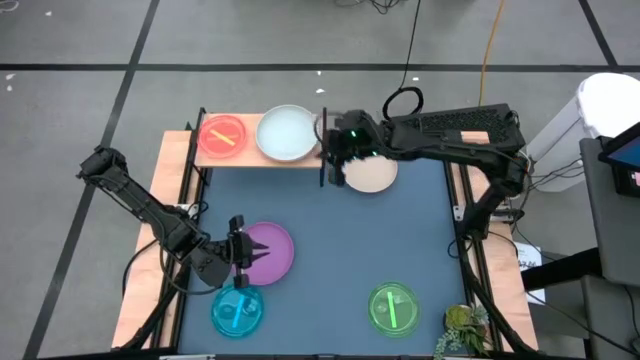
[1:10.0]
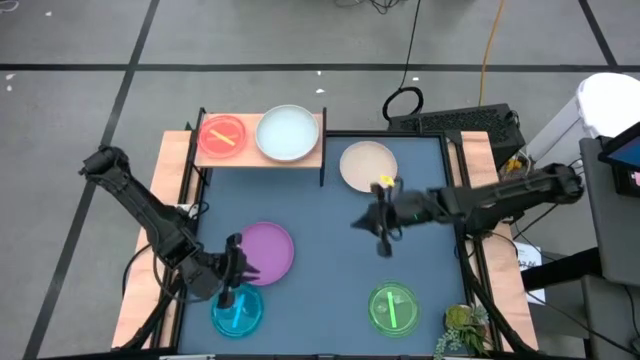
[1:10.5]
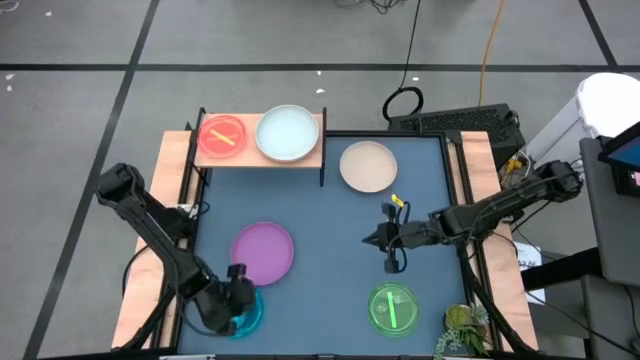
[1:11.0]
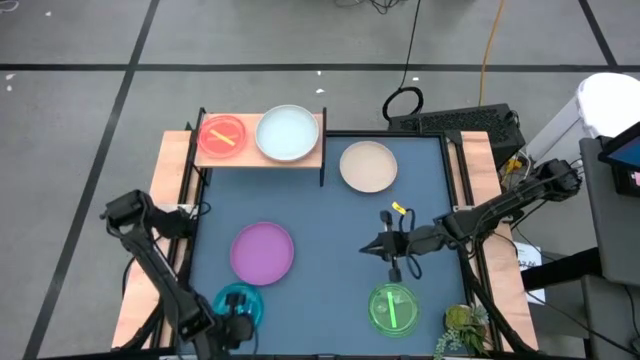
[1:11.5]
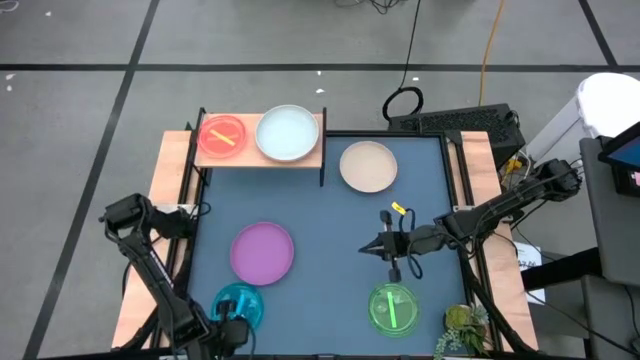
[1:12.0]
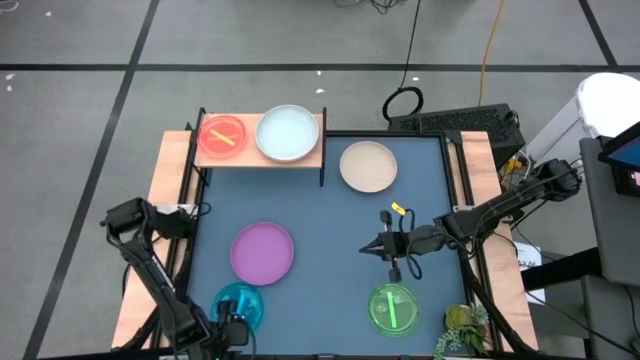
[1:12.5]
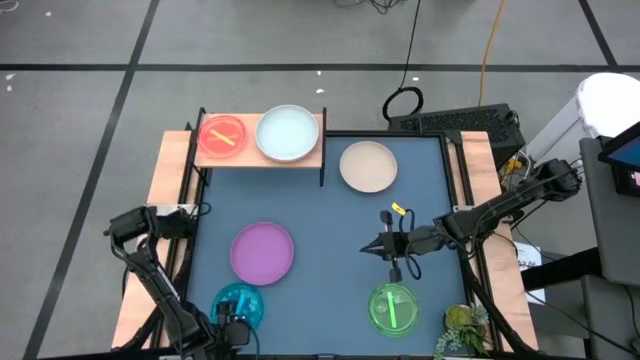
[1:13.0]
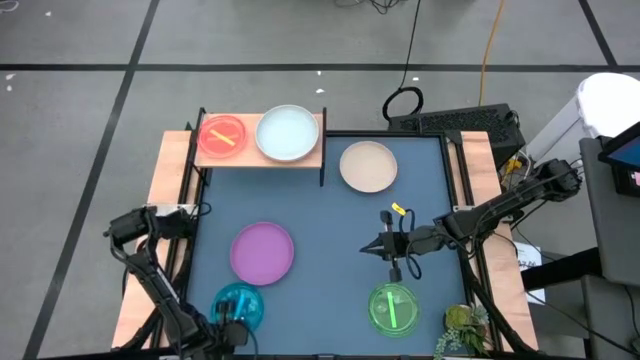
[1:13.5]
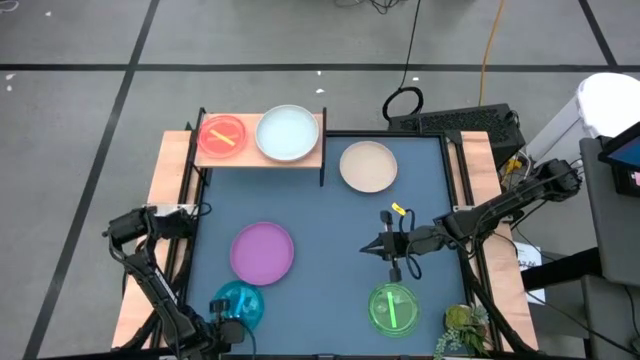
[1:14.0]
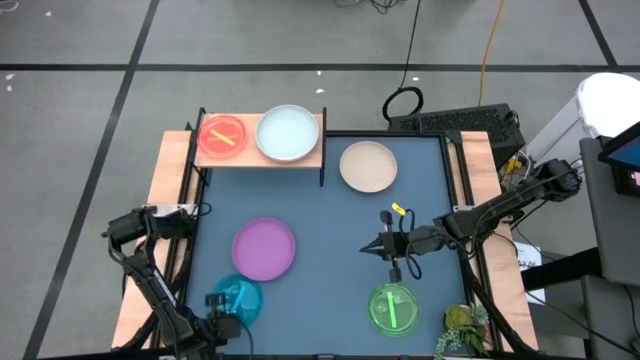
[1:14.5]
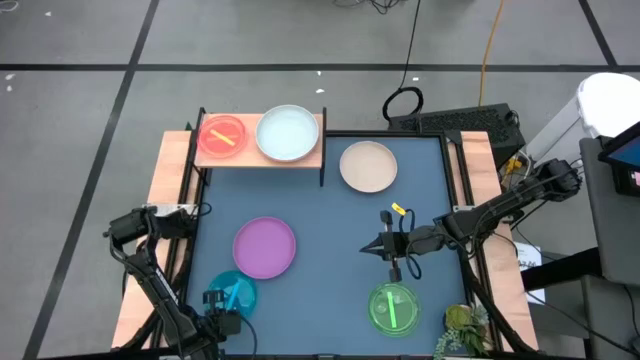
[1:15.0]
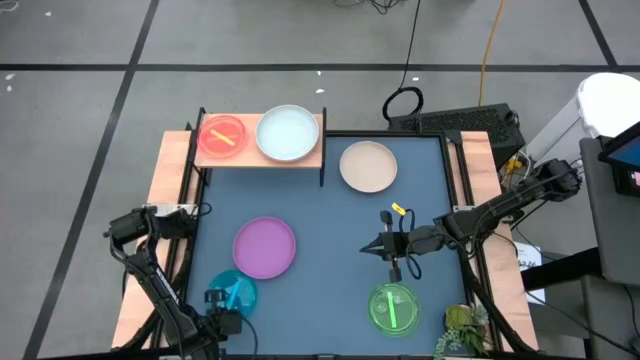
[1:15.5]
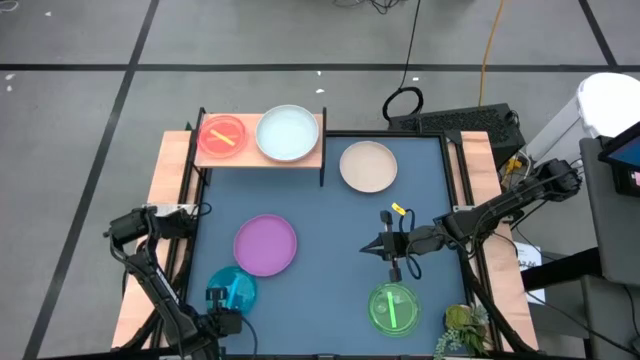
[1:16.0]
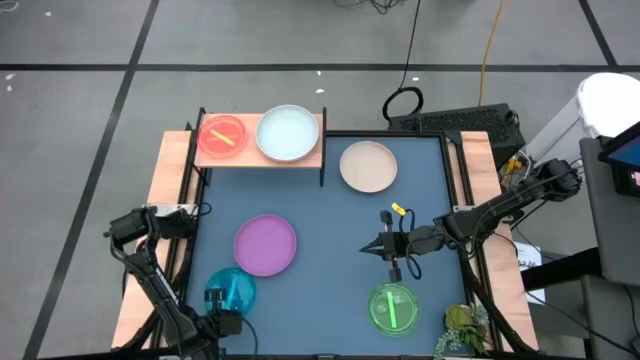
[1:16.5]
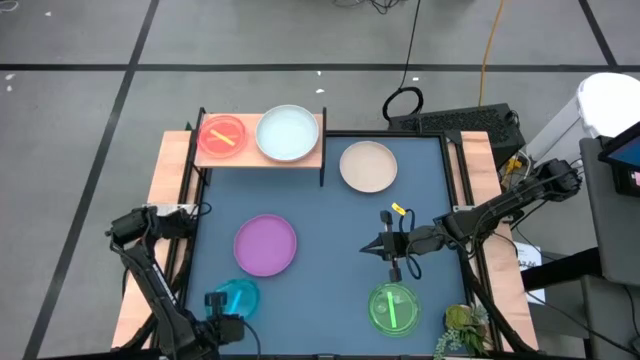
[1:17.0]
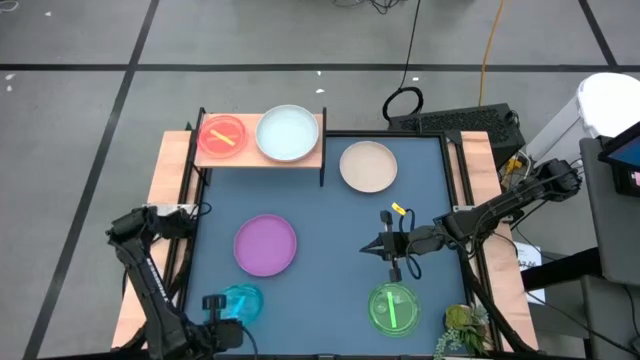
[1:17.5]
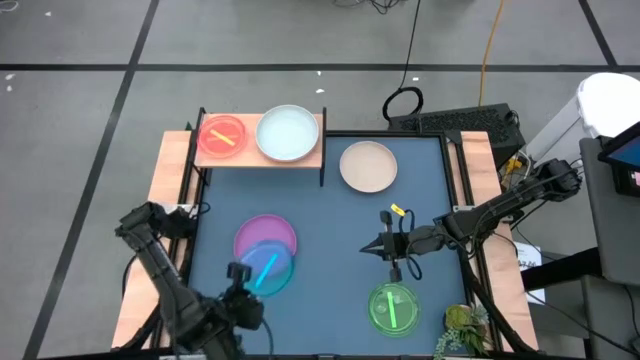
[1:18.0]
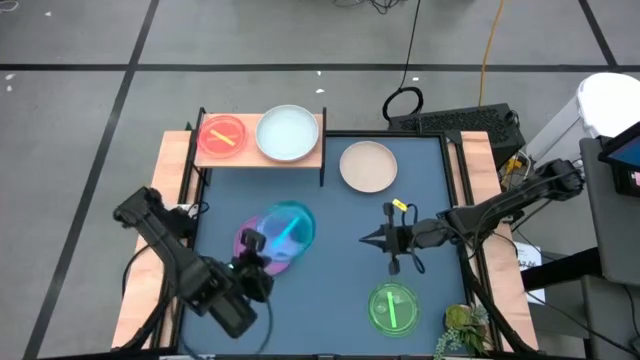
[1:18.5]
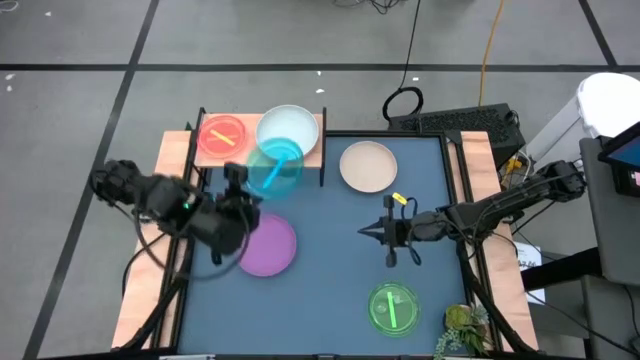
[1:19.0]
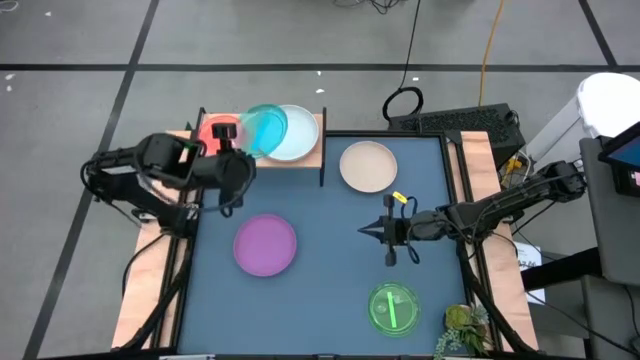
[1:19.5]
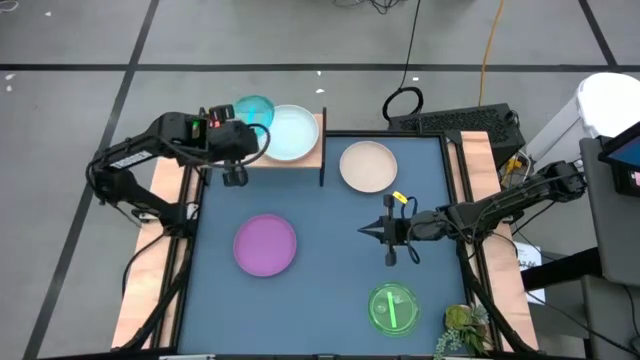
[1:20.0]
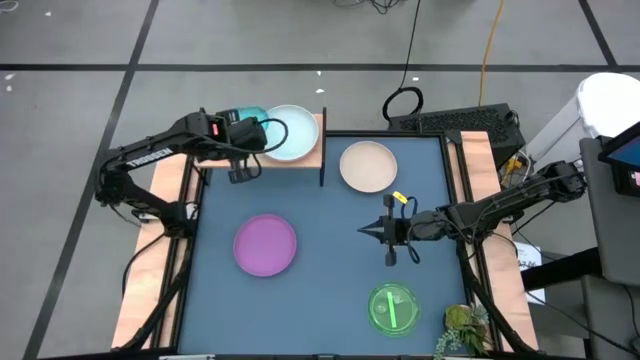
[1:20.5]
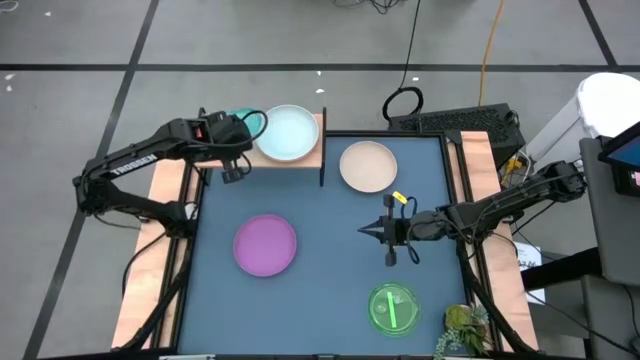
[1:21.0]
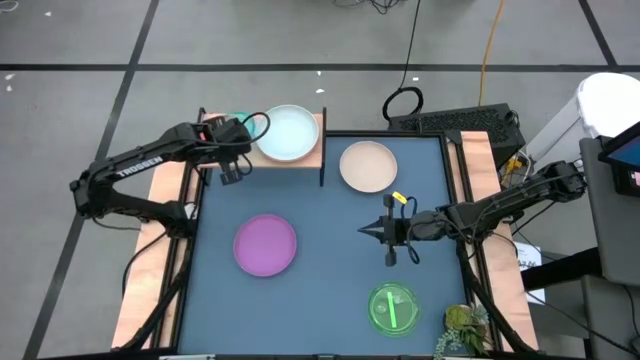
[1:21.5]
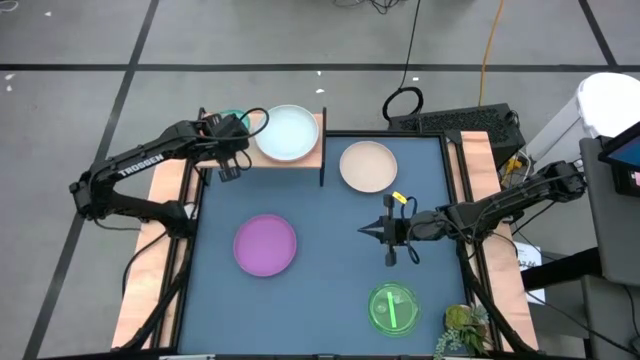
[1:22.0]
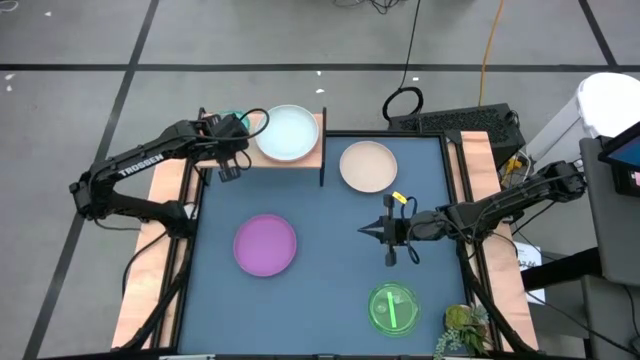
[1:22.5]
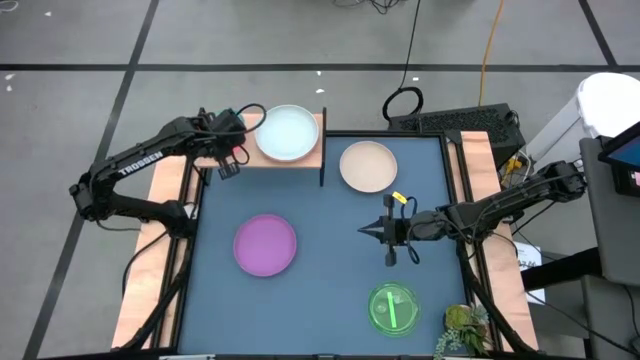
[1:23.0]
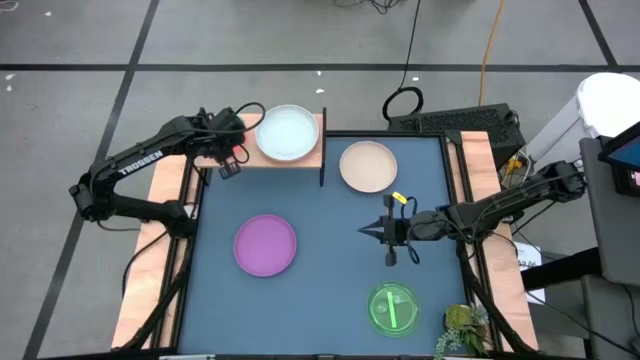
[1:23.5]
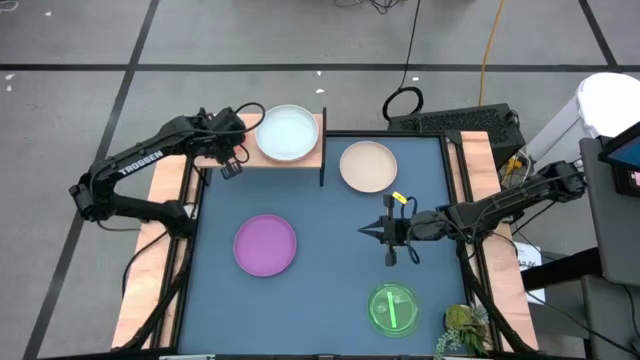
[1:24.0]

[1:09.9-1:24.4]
Task: Place and stack plates onto a shelf
Stack the blue plate on top of the orange plate on the shelf

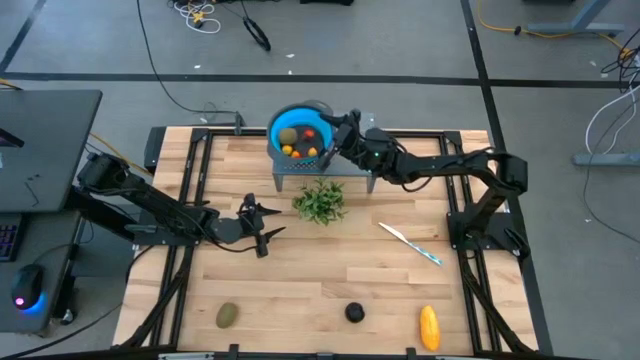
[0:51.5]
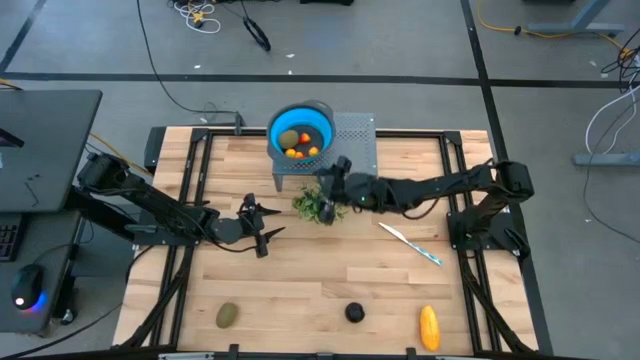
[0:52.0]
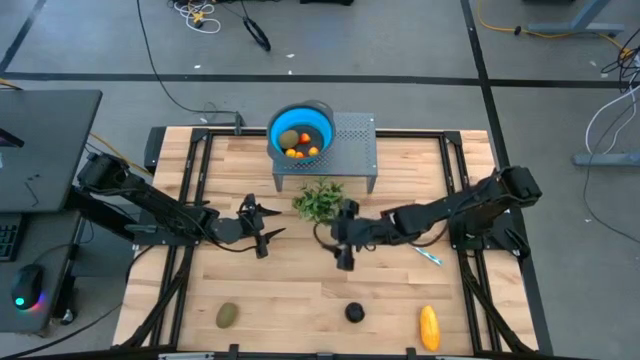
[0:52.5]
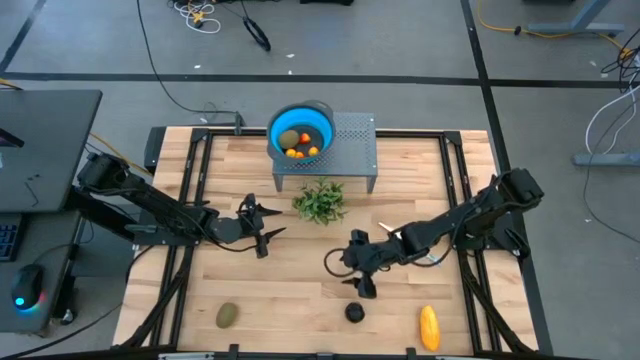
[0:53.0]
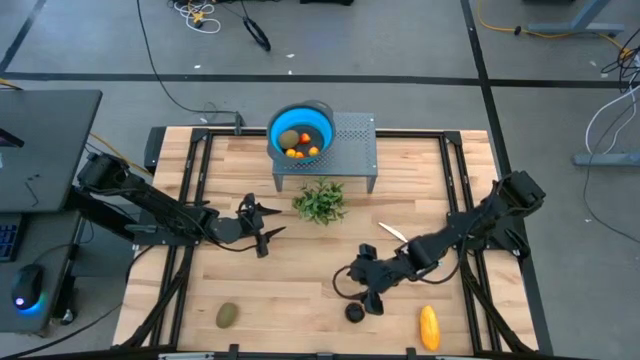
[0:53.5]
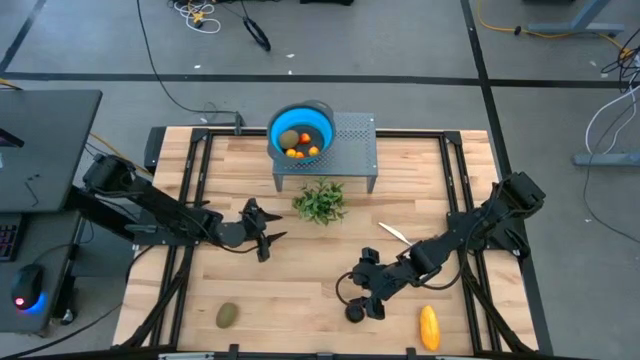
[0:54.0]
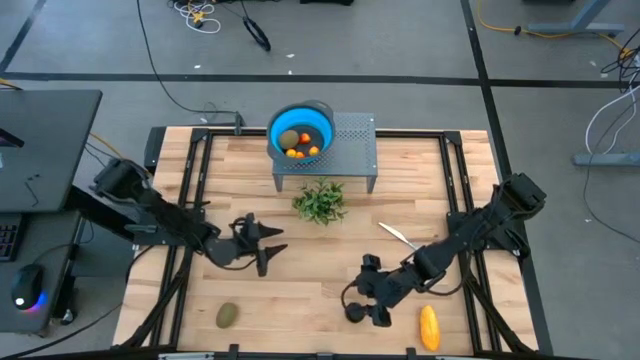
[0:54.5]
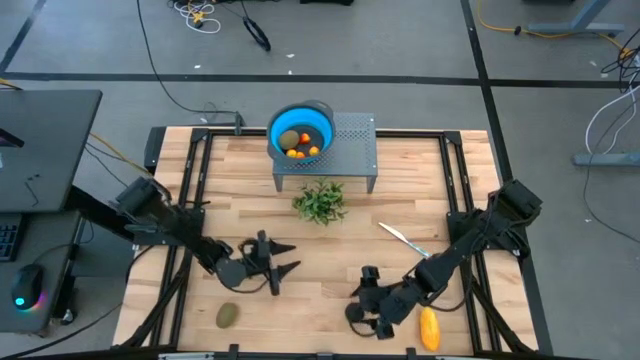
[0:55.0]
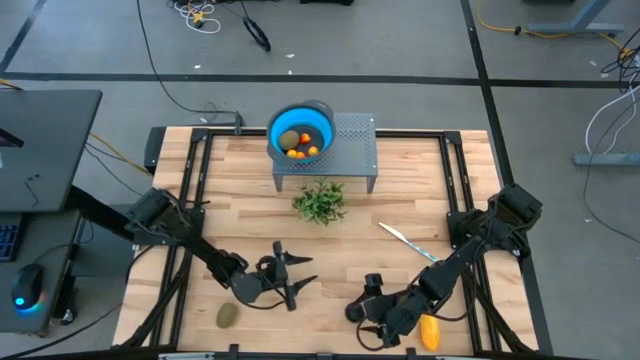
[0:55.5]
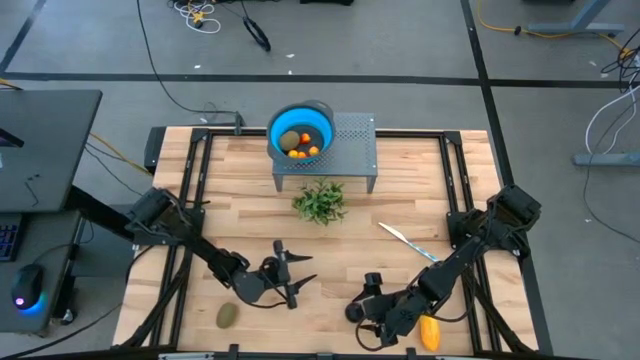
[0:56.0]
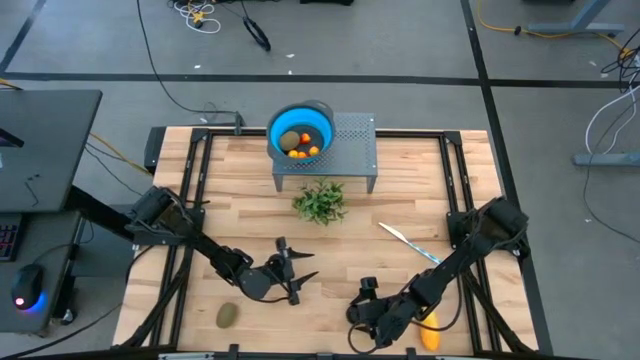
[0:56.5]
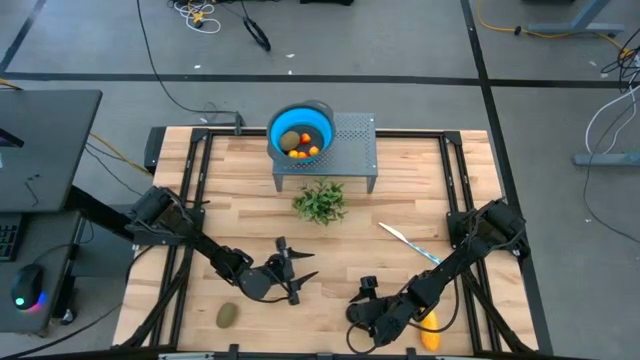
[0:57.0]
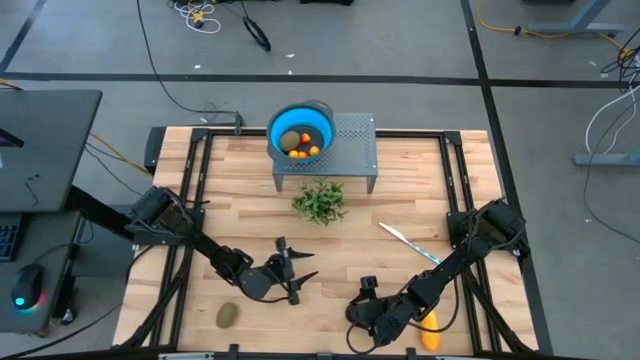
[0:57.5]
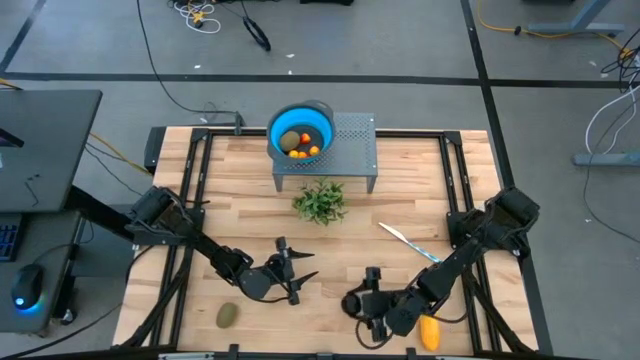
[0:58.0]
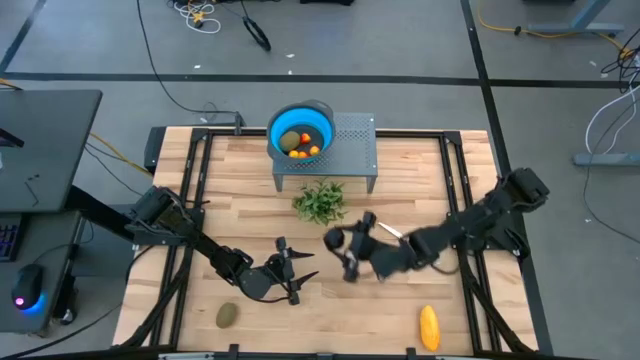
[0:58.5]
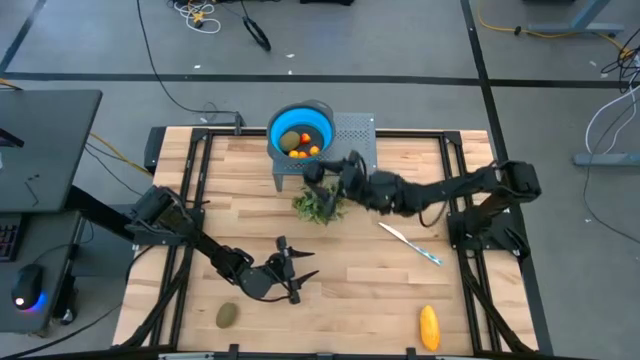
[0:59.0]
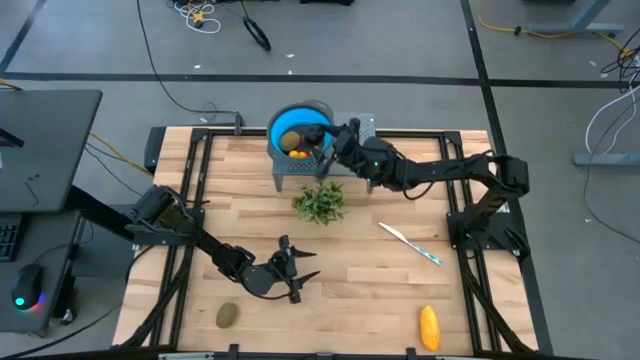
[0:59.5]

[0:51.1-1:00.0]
Task: Pick & Place Fruit
Put the black plum into the blue strainer bowl on the shelf
